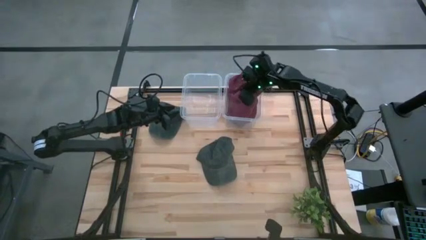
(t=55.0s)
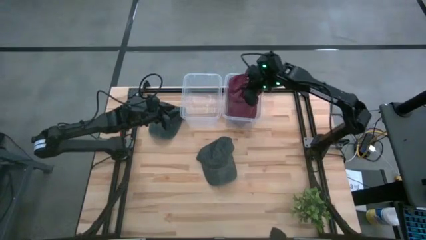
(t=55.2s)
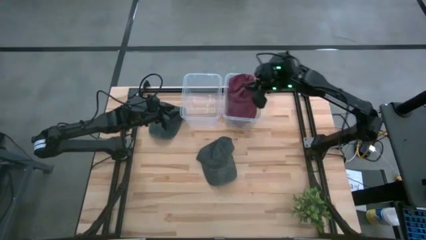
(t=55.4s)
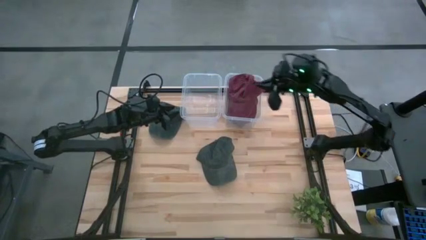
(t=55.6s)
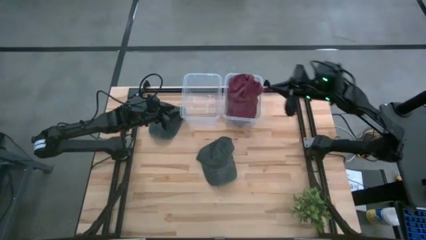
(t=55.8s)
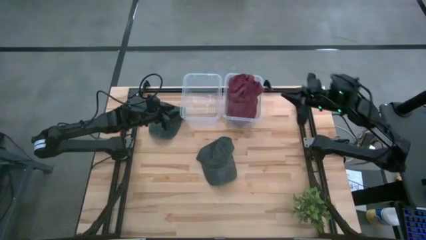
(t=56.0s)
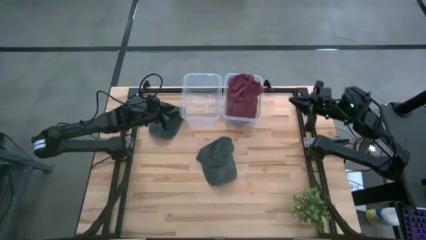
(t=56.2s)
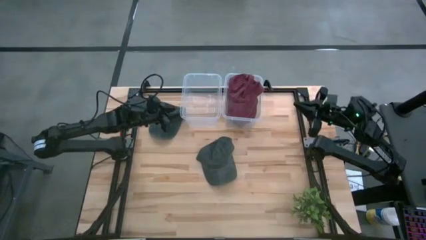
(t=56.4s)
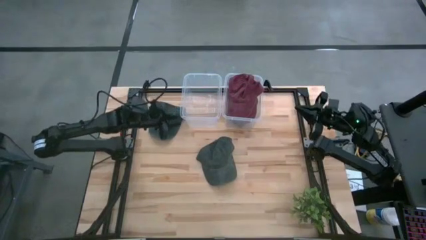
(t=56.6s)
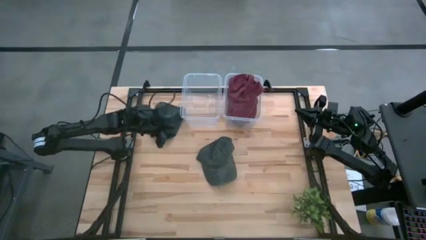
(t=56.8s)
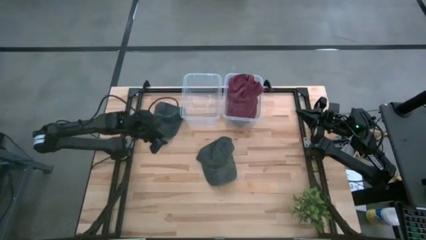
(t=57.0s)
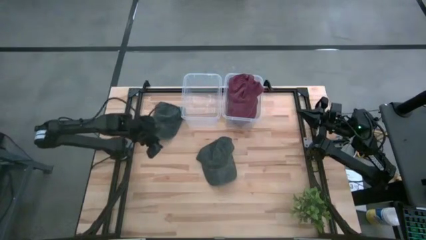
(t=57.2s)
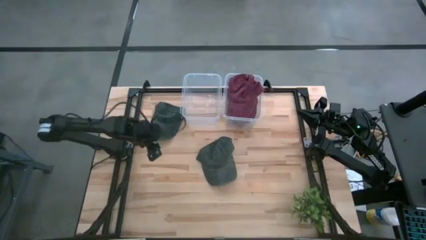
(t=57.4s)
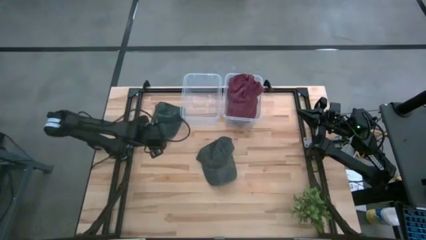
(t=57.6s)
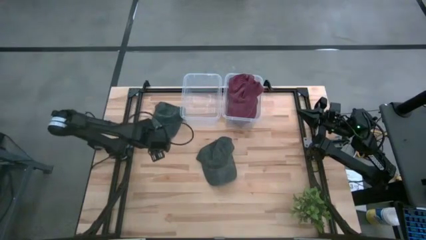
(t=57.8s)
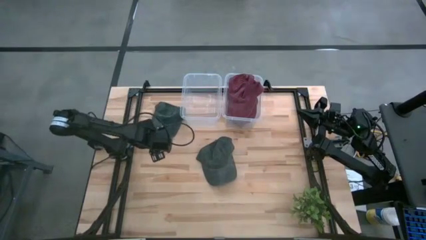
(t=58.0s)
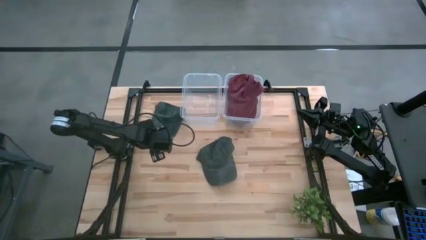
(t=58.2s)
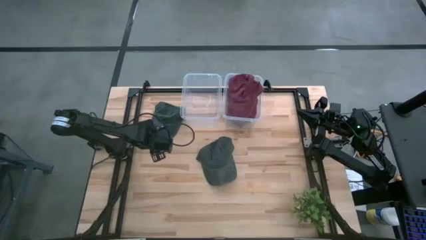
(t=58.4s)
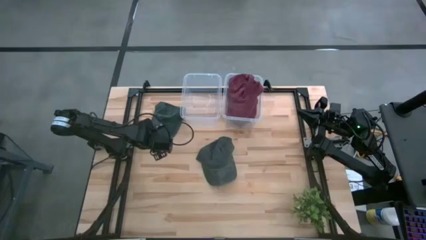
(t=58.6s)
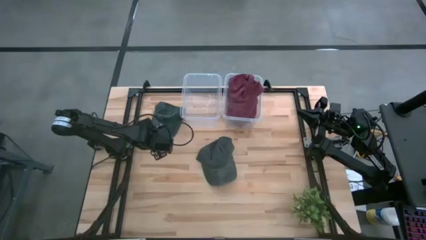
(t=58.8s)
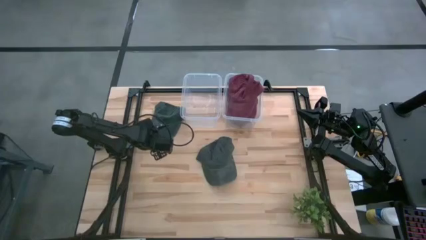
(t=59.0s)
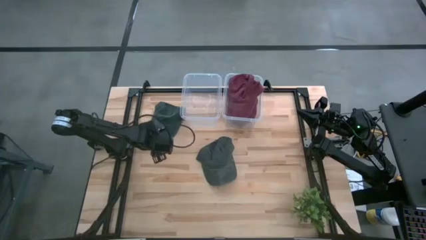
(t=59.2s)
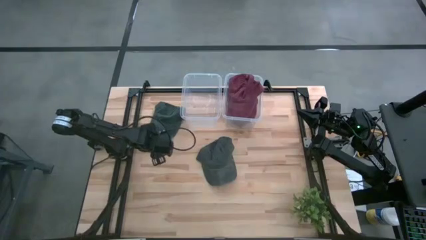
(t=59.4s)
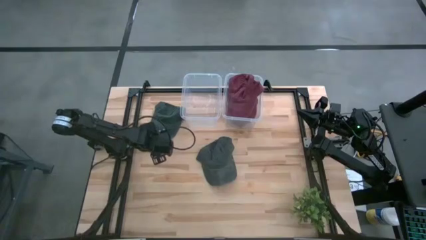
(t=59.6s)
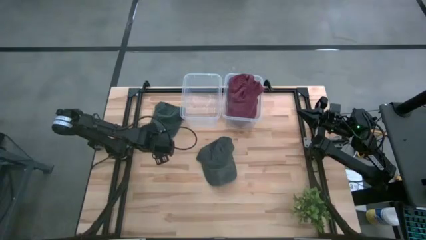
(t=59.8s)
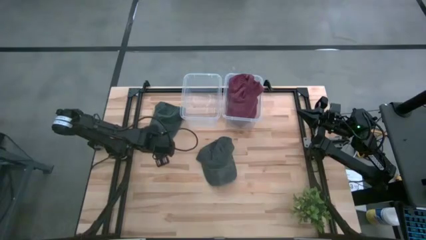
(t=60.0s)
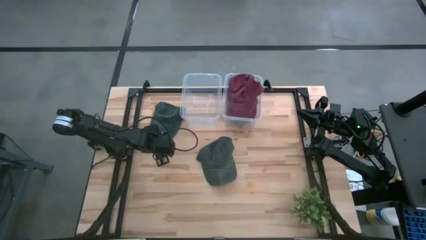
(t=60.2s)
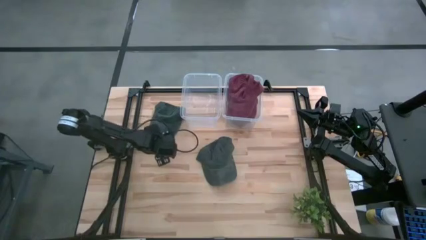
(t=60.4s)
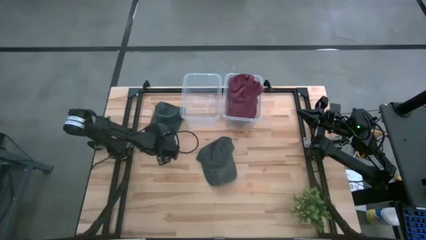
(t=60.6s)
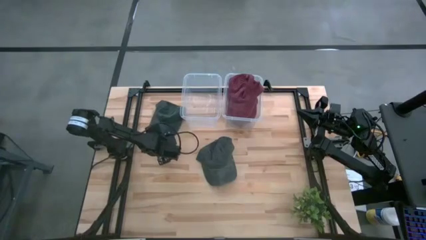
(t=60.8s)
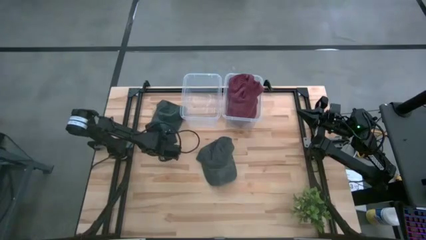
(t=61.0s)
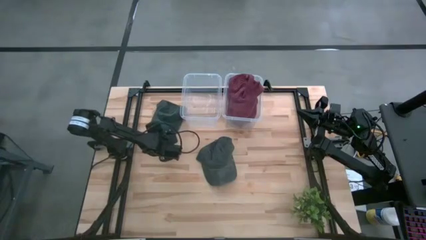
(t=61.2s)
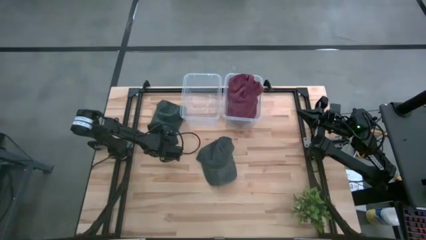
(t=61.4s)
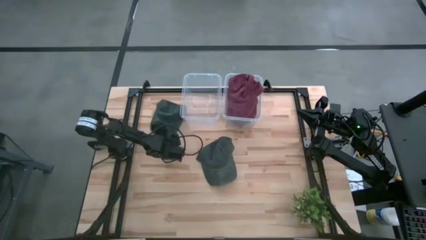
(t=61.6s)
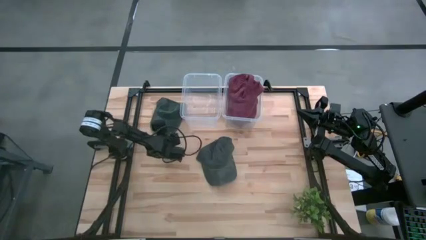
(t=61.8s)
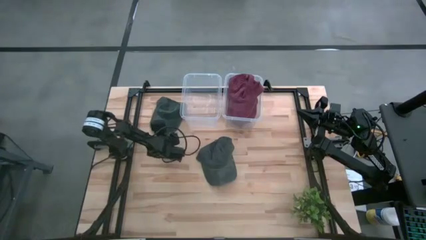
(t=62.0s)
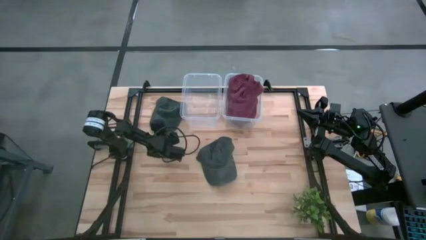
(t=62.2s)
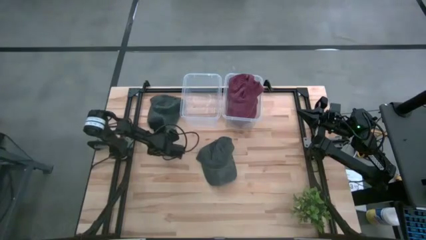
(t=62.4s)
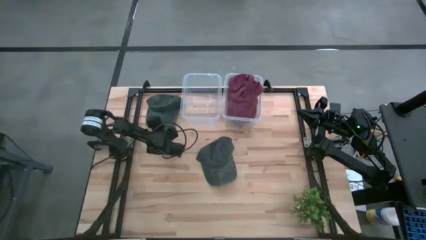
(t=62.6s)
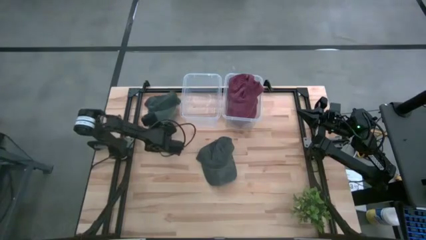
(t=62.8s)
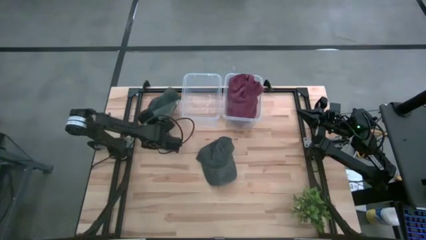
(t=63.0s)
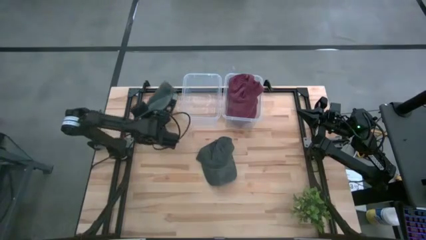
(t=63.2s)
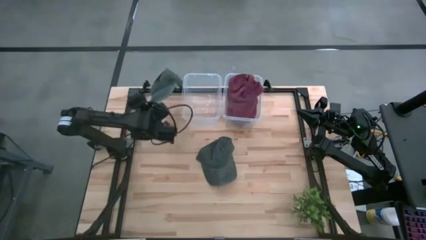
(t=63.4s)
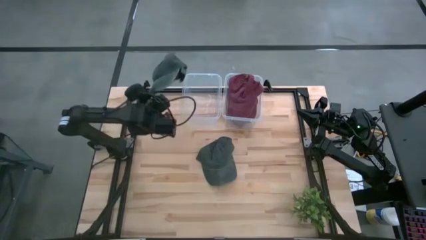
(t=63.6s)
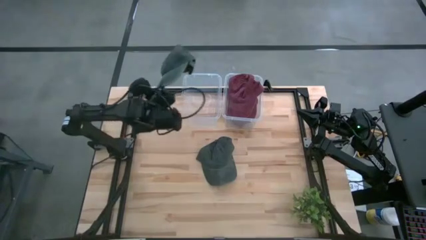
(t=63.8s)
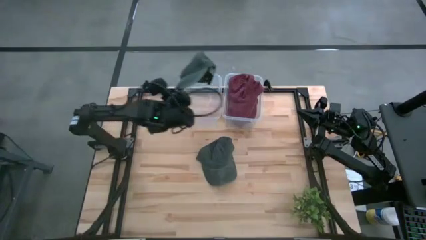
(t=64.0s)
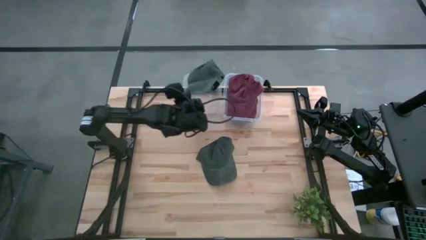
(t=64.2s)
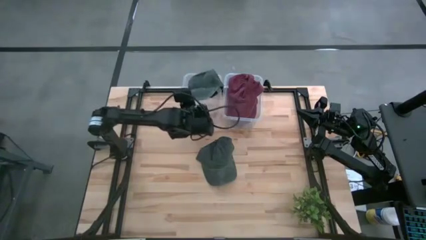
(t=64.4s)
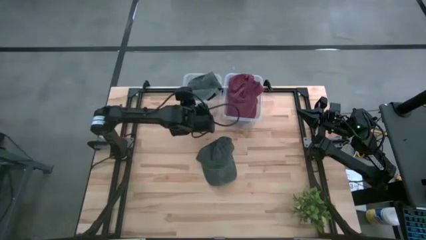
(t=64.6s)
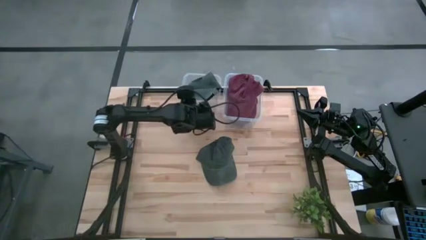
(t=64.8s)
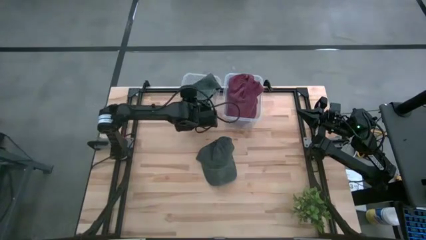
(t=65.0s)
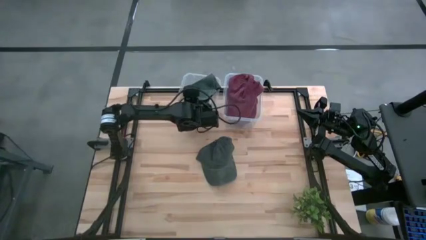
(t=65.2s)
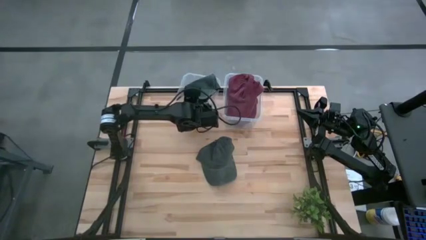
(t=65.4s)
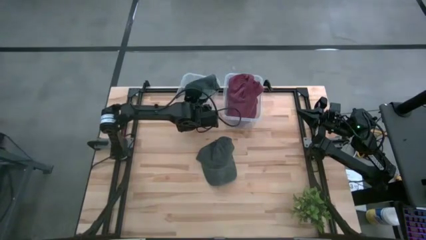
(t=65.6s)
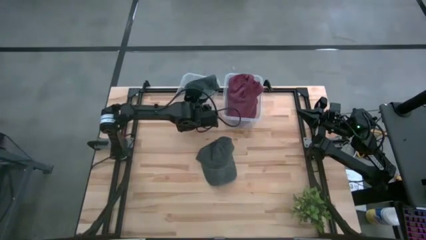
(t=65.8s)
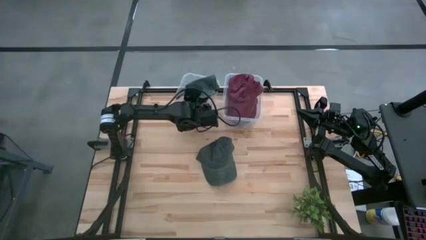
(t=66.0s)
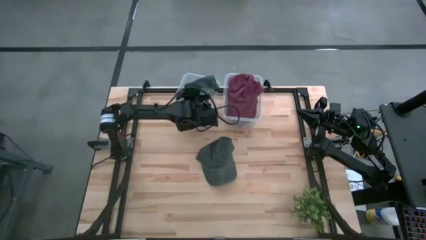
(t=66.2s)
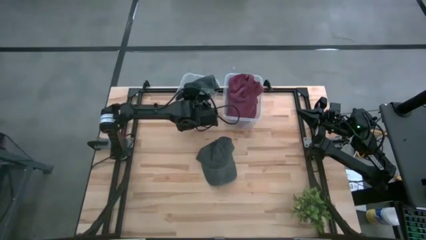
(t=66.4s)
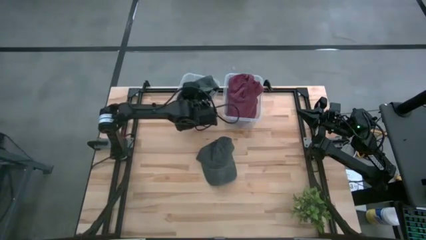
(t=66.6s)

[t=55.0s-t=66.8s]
Task: Pick & Place hat
Put the top gray cap into the left transparent bin
